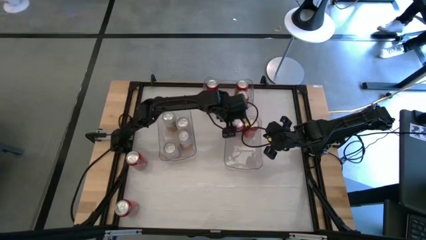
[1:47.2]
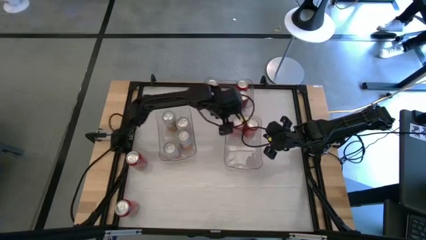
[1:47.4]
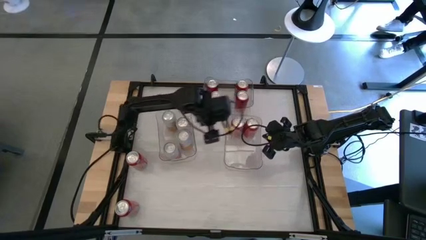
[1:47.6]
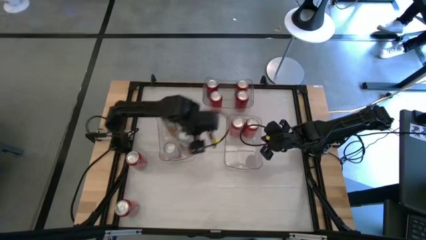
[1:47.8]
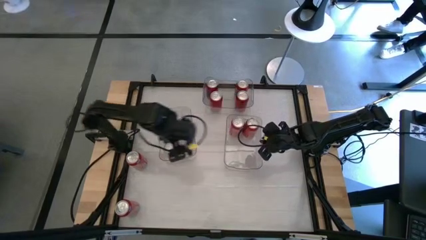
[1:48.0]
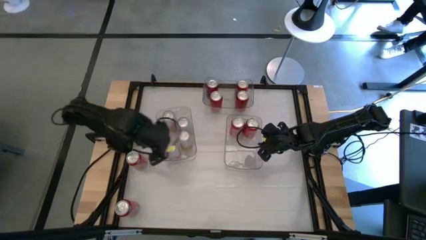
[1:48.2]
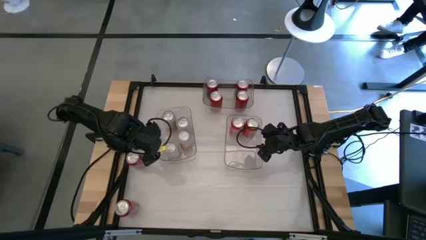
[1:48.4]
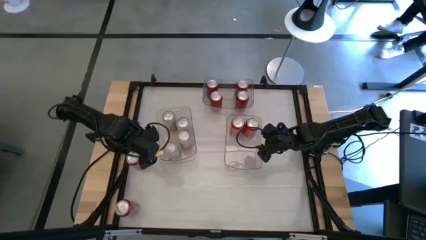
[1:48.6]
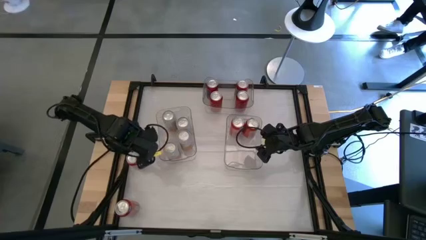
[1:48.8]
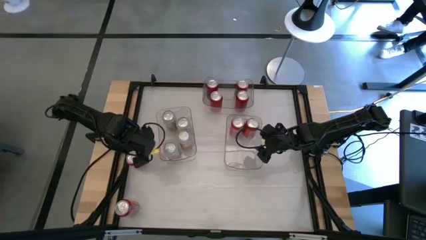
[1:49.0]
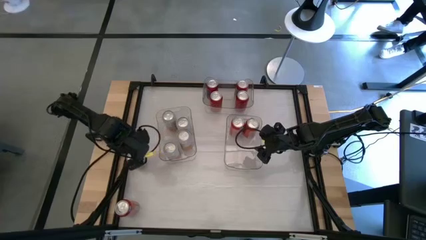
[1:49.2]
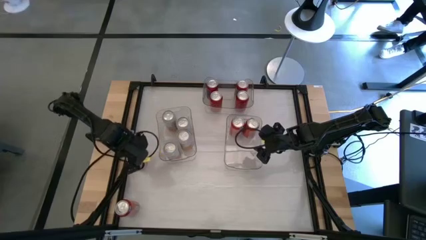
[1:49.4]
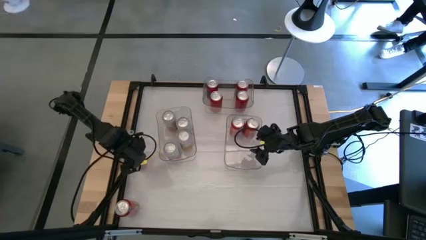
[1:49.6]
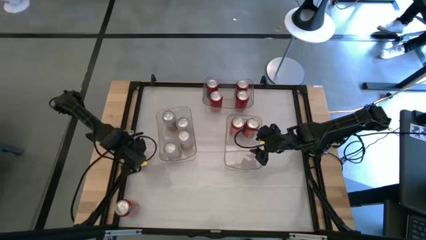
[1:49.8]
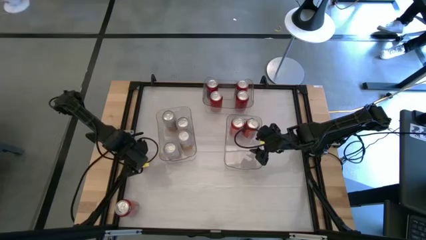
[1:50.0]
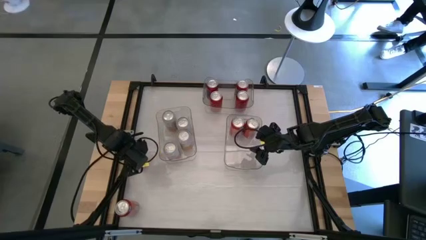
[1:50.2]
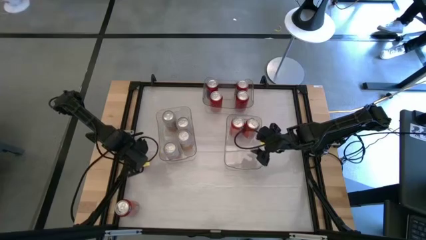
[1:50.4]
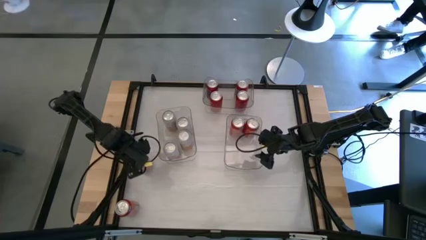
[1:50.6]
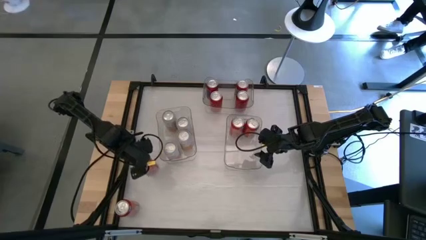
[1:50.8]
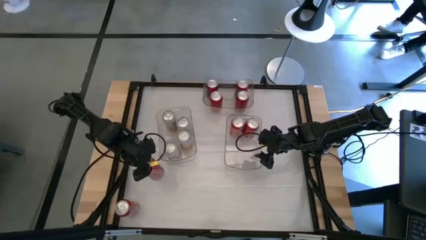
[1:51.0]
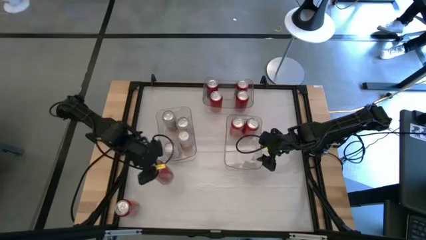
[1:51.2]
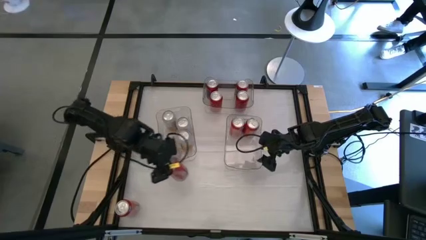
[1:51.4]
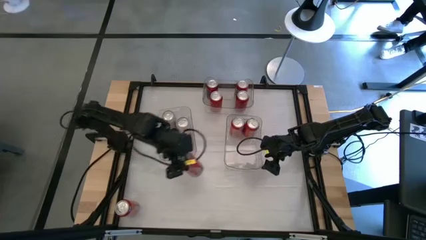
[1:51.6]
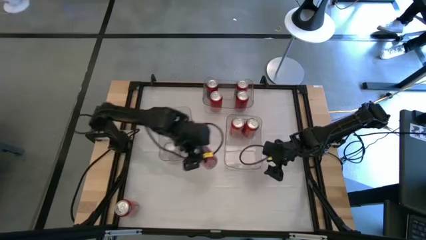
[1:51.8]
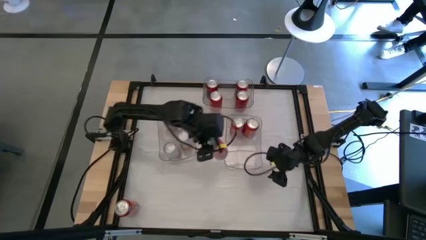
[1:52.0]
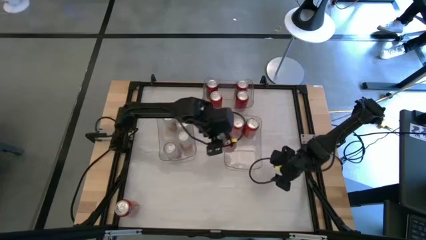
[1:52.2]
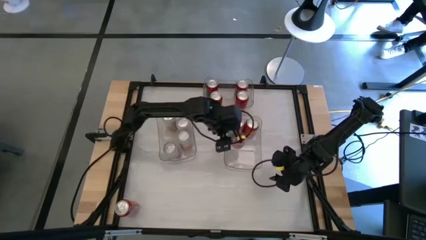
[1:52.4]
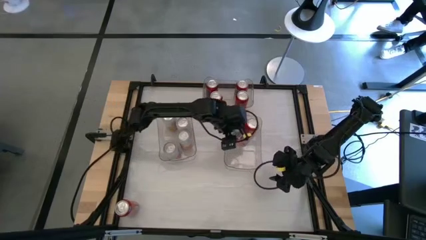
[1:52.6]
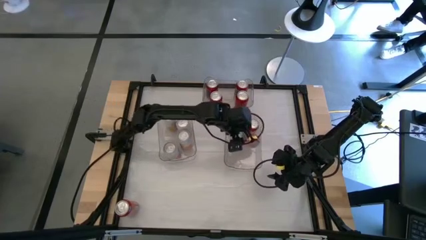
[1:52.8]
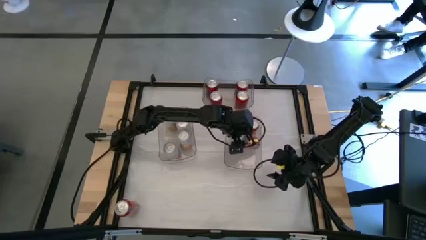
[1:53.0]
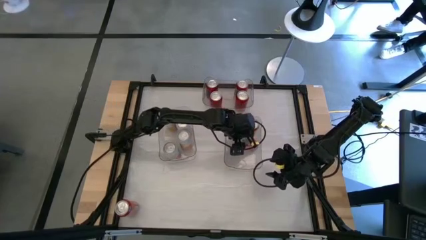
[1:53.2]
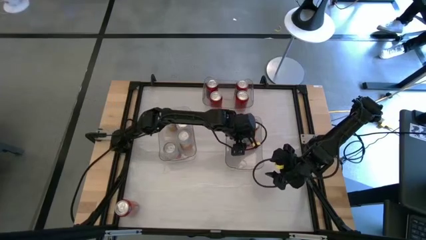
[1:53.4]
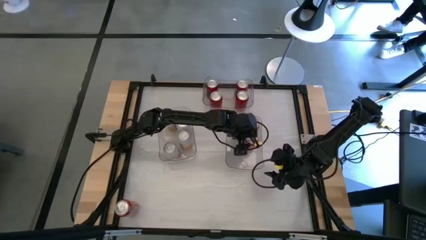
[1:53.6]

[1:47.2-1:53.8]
Task: Sort soda cans
Put the top red soda can into the right transparent bin

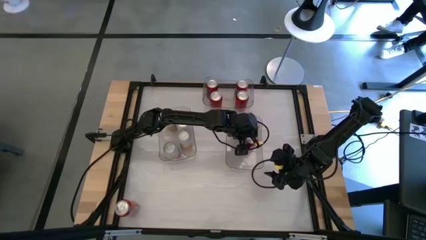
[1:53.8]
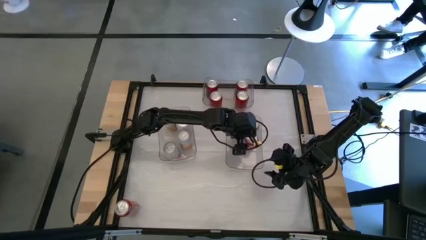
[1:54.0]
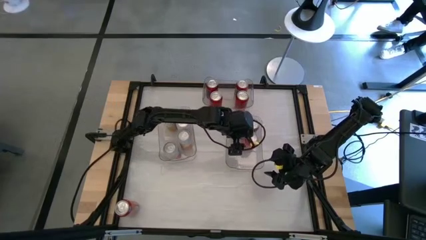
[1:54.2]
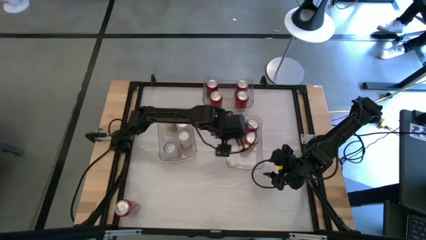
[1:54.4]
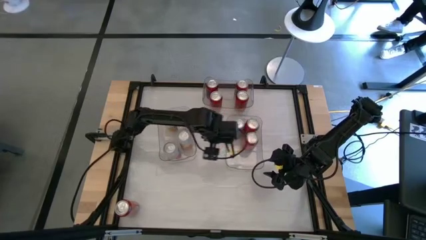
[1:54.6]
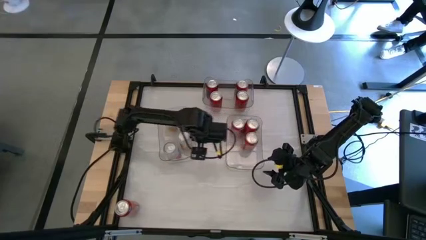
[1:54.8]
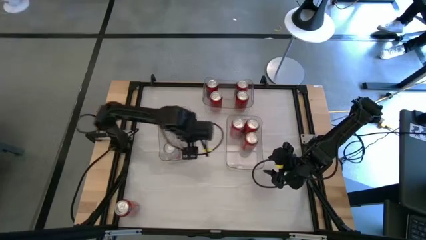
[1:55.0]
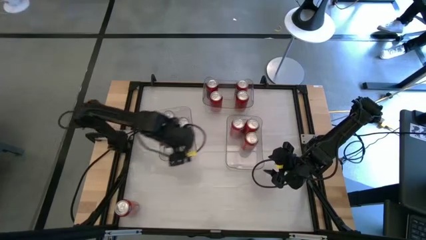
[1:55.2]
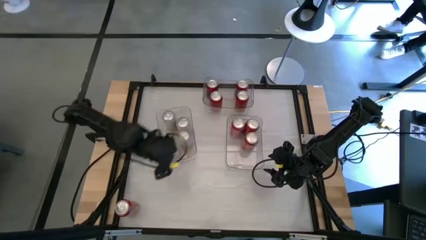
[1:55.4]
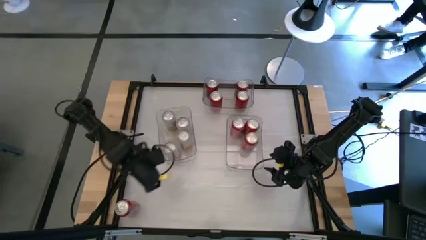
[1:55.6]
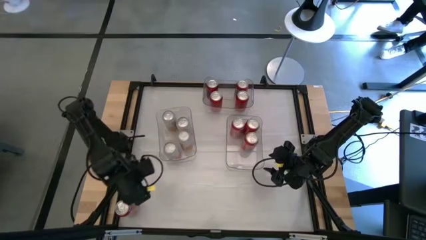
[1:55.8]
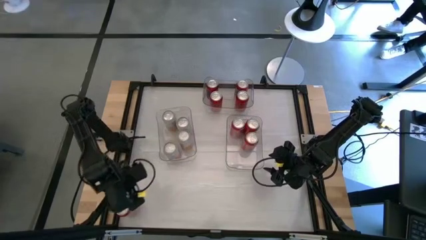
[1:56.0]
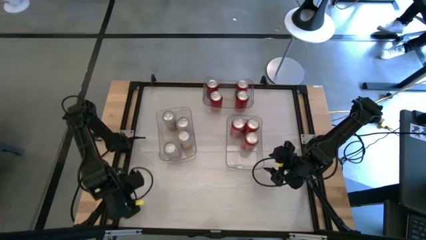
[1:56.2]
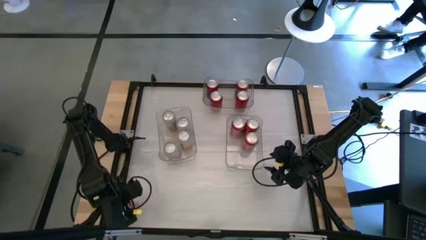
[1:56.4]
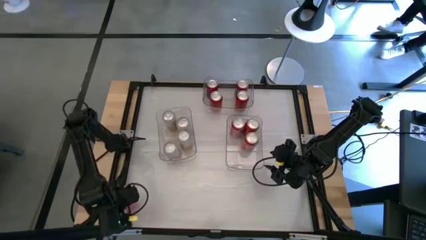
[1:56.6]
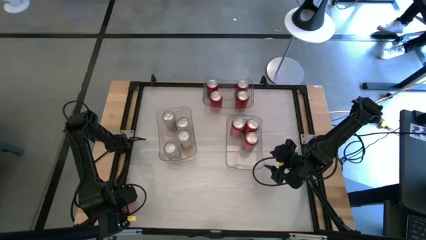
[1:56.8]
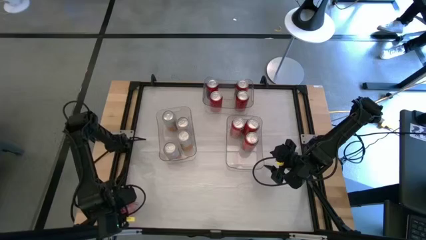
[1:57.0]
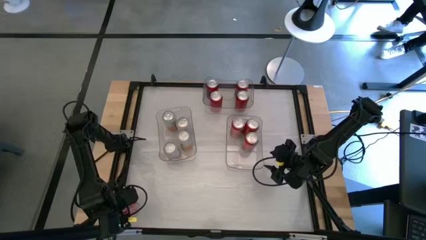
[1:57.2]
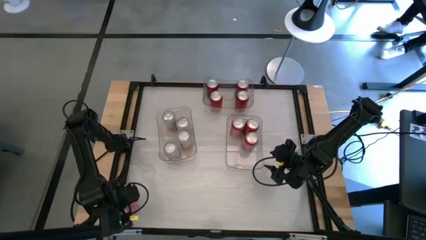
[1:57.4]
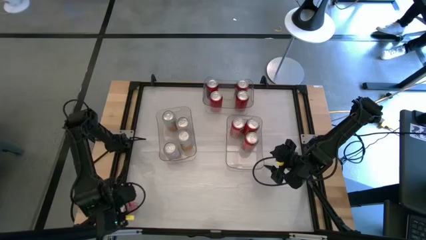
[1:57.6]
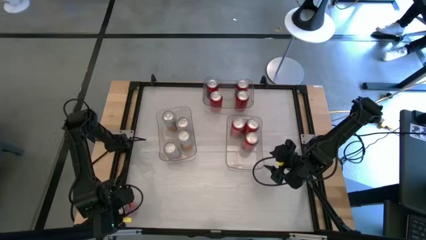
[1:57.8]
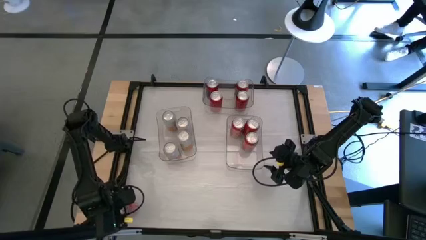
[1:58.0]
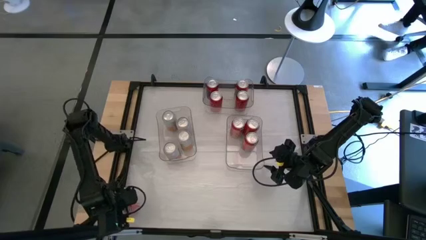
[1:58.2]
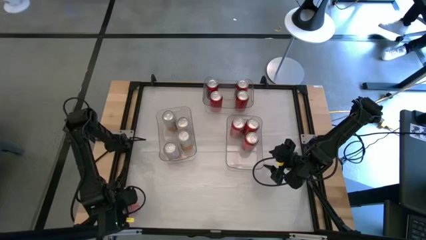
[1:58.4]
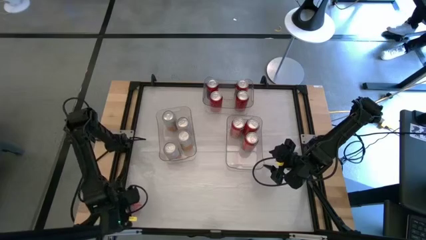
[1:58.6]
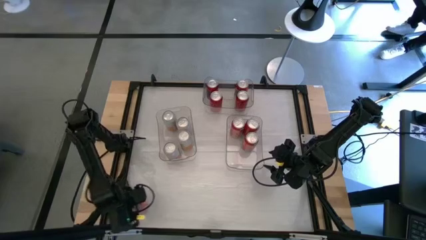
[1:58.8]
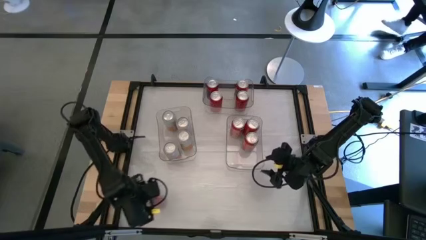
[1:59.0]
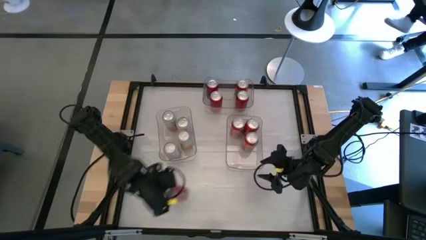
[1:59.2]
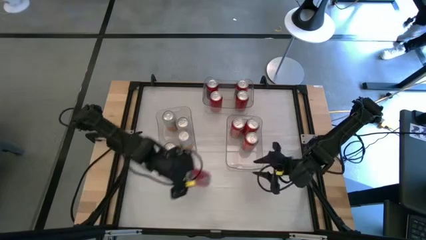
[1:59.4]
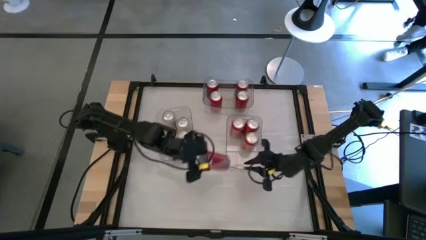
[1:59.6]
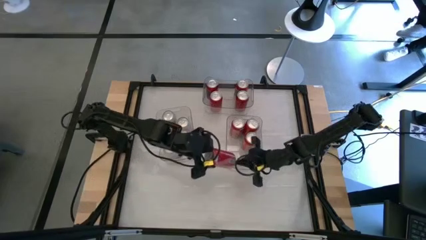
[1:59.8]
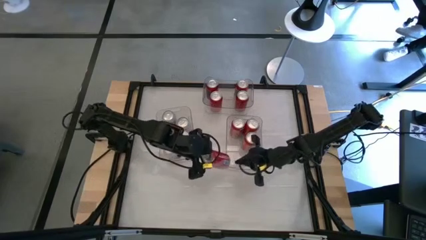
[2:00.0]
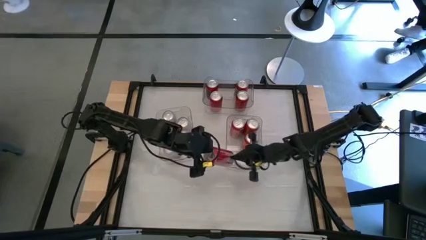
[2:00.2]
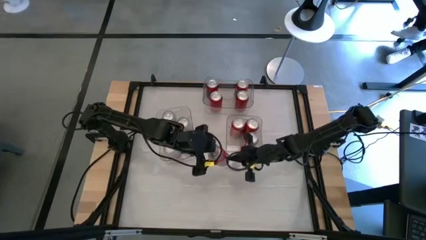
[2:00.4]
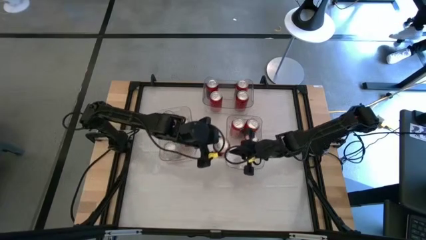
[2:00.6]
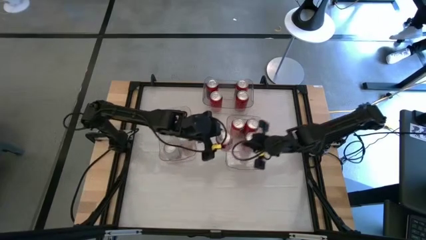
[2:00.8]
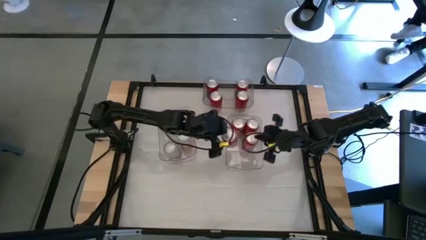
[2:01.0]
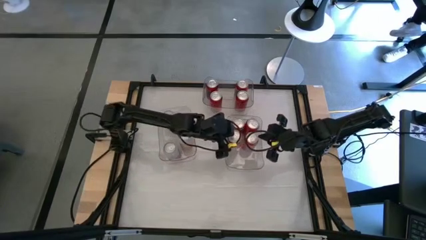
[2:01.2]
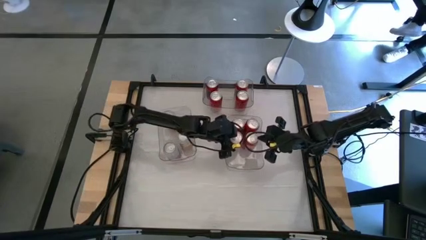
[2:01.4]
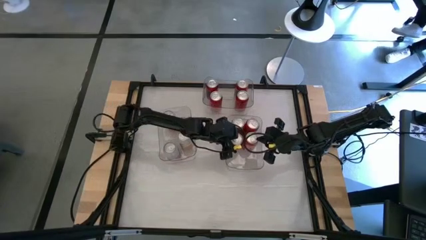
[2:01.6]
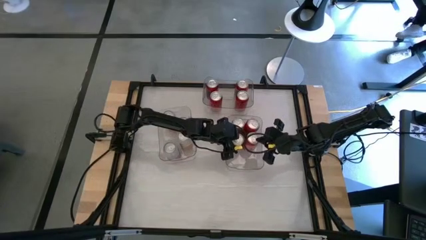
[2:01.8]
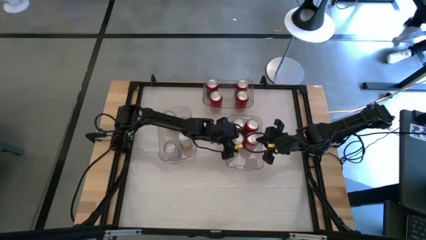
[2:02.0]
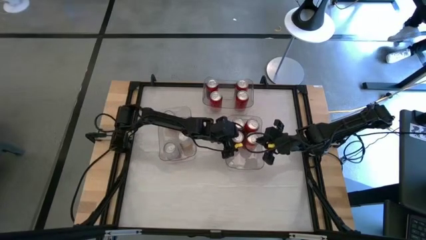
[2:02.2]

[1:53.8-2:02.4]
Put the red soda can into the right transparent bin
